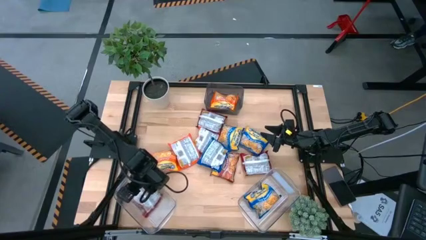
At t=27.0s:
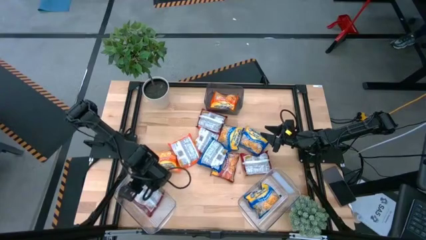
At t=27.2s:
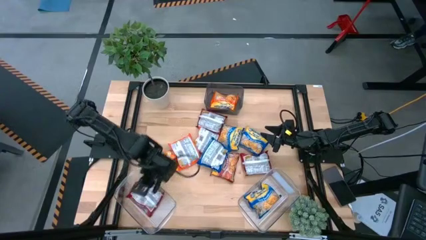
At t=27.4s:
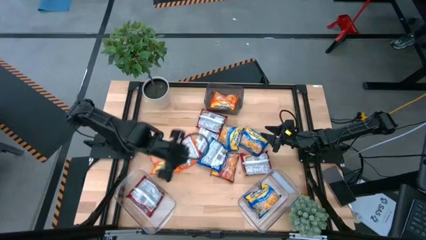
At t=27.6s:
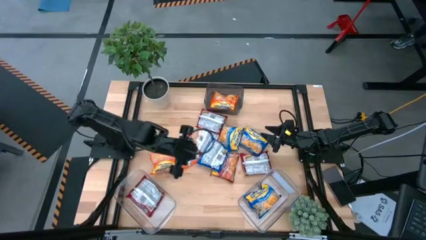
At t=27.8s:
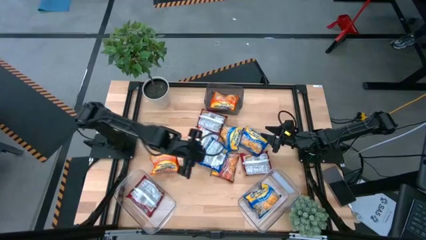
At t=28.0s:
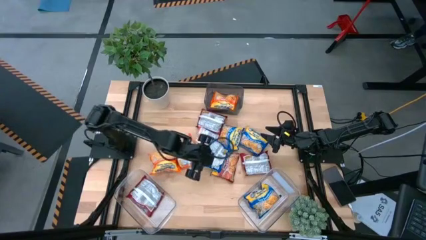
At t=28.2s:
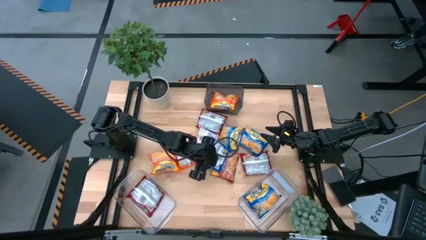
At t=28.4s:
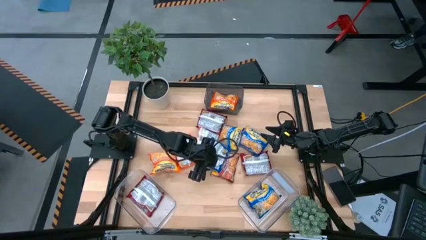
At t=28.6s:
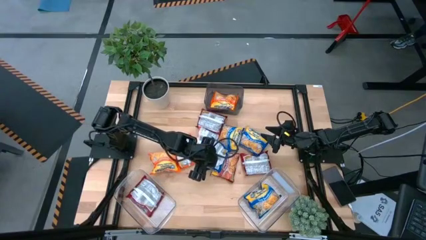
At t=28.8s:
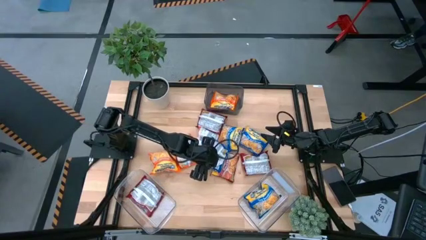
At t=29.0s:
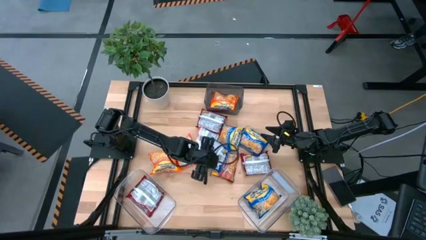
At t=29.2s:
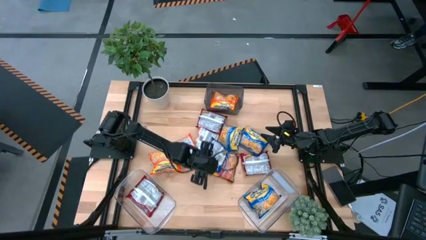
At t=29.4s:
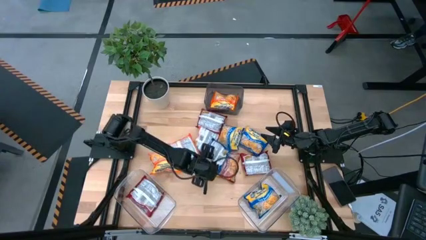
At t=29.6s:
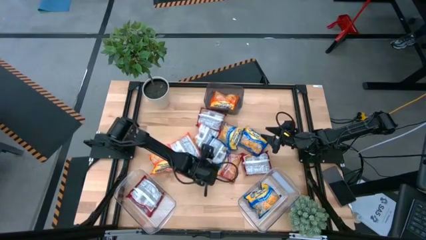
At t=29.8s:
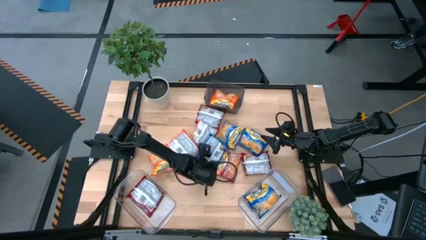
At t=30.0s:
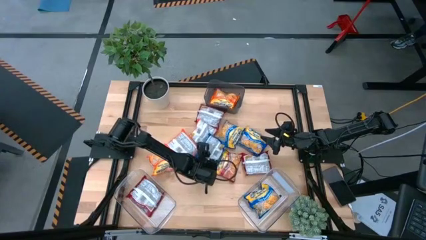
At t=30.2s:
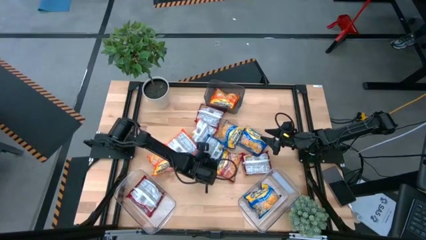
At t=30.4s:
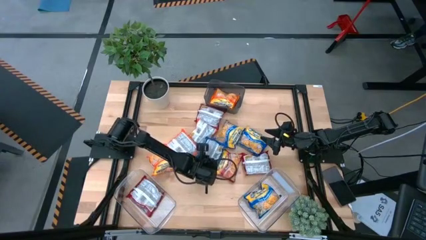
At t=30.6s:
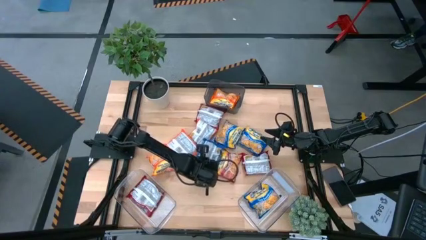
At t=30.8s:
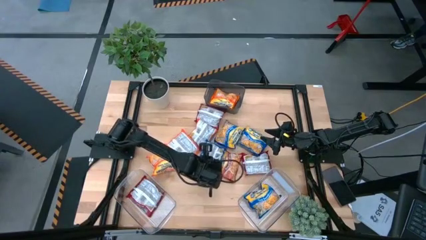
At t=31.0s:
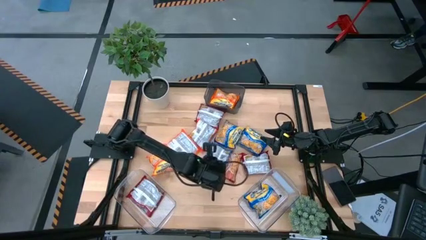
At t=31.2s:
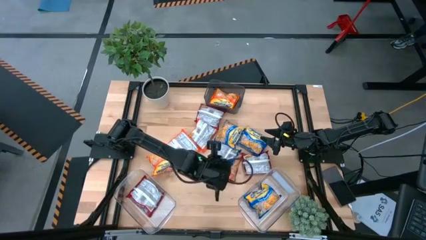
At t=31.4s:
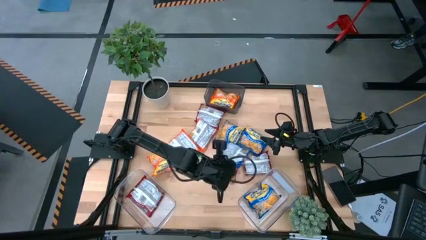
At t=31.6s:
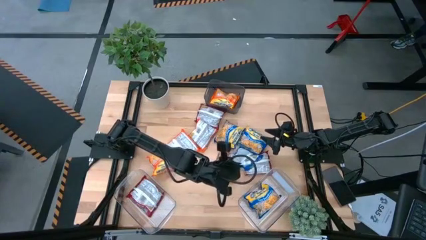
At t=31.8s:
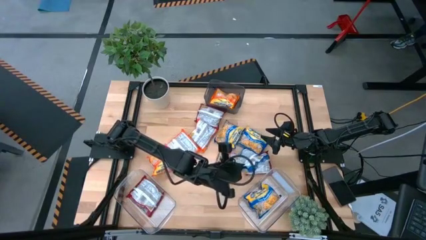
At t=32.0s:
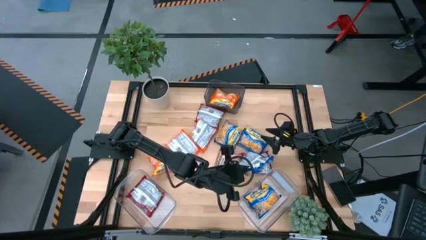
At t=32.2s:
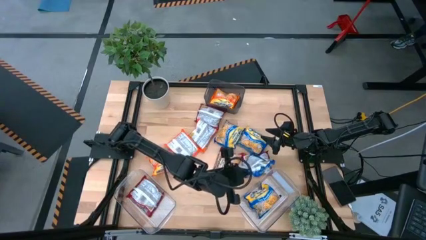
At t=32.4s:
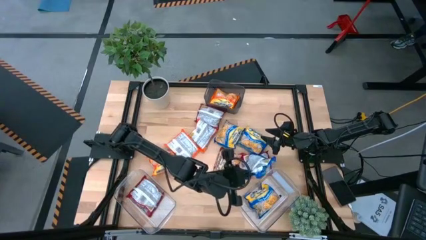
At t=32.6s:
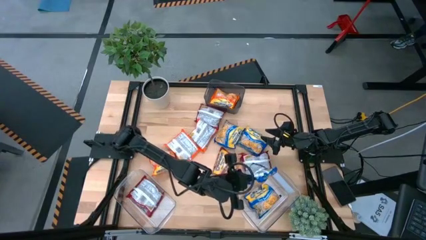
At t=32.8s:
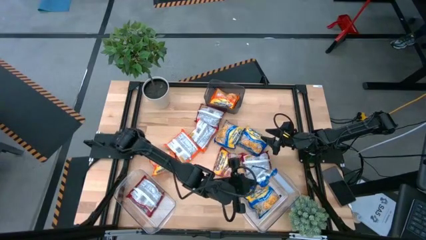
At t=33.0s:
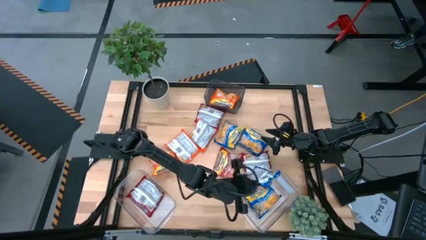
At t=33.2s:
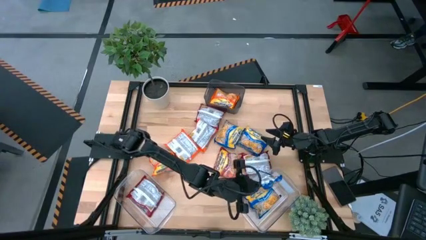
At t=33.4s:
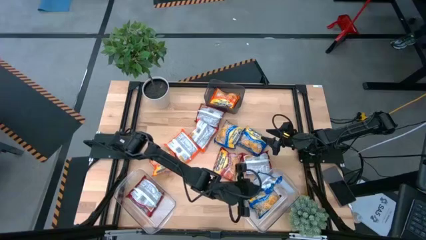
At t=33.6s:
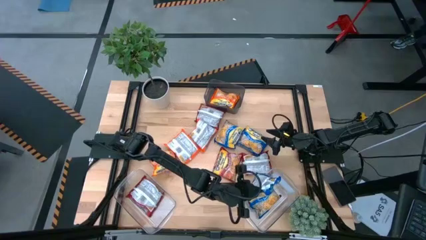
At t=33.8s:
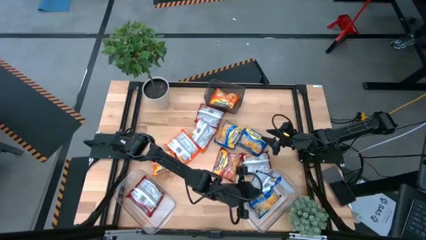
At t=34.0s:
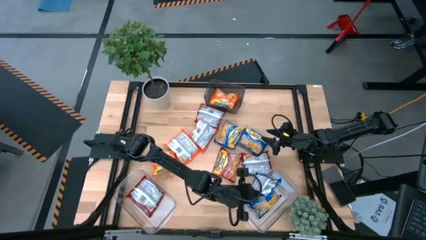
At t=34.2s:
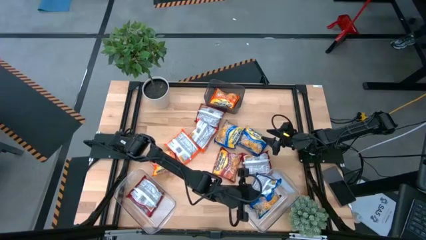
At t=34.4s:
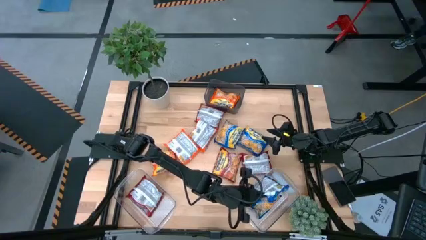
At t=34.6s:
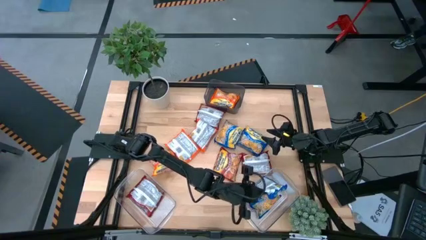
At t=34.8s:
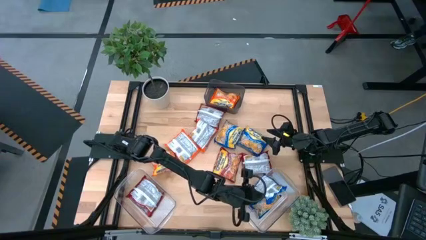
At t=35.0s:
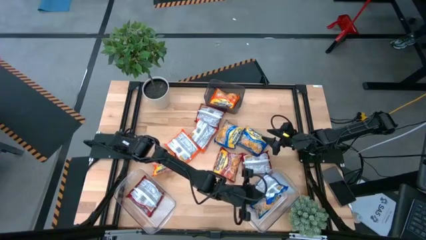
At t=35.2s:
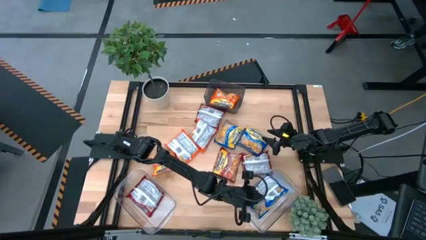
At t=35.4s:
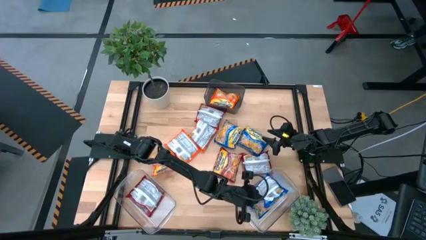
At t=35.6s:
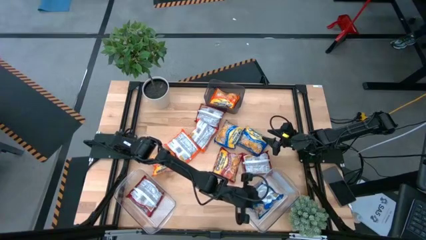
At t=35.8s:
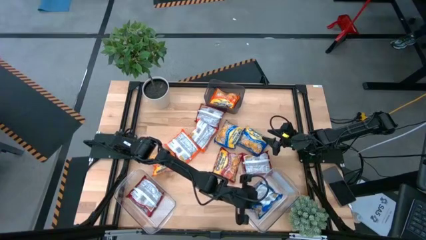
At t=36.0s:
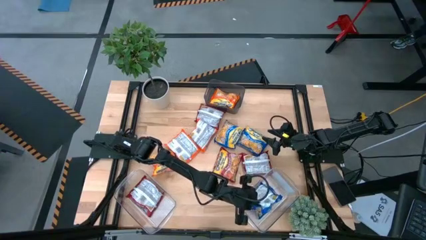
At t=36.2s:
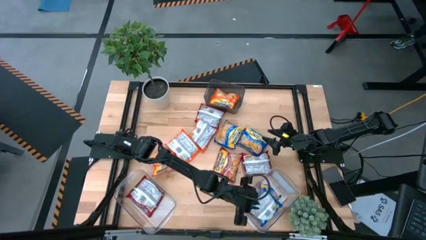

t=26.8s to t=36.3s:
Task: Sort Maruchan noodles
Put the blue noodle pack into the right transparent bin

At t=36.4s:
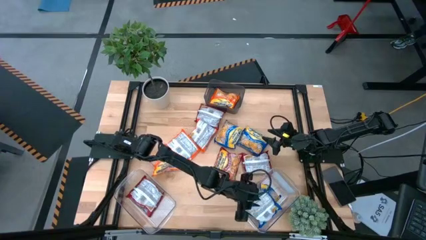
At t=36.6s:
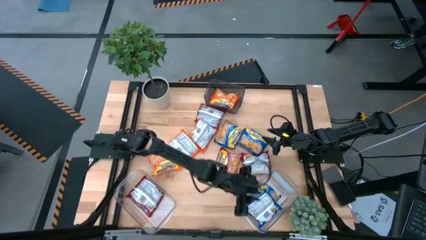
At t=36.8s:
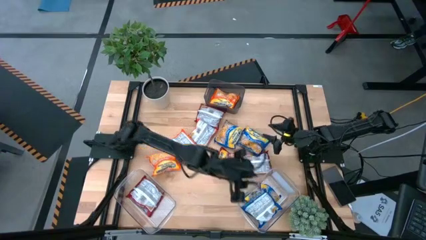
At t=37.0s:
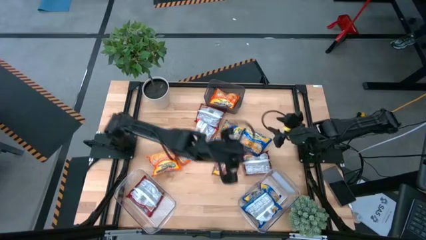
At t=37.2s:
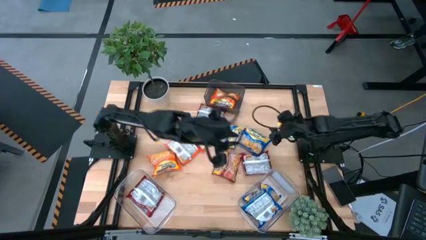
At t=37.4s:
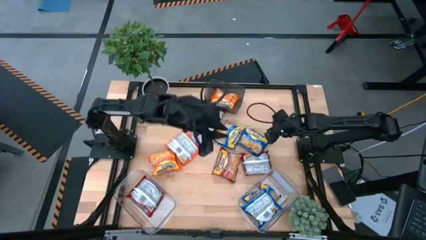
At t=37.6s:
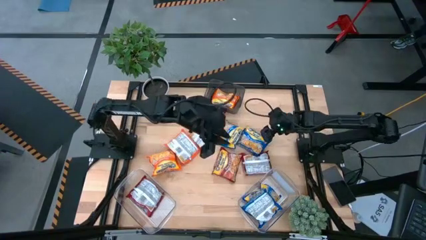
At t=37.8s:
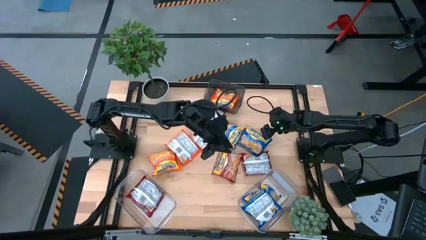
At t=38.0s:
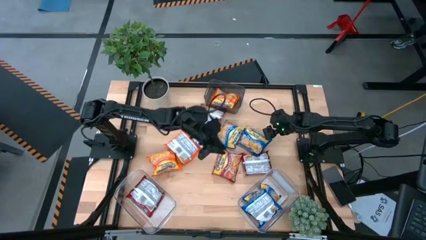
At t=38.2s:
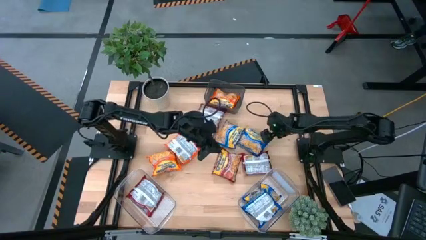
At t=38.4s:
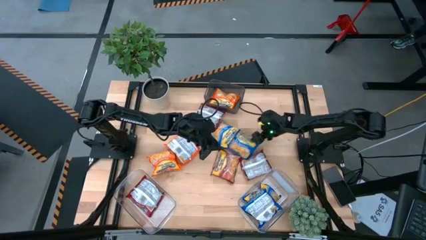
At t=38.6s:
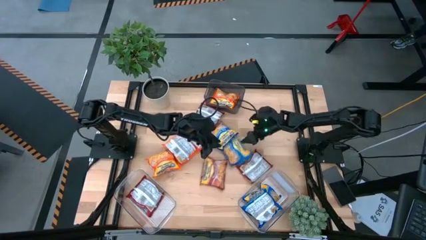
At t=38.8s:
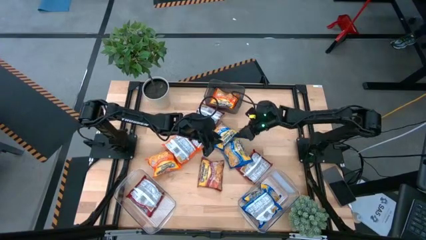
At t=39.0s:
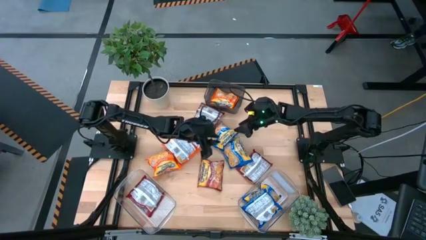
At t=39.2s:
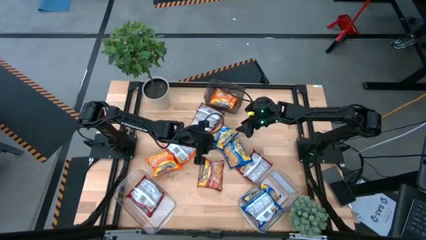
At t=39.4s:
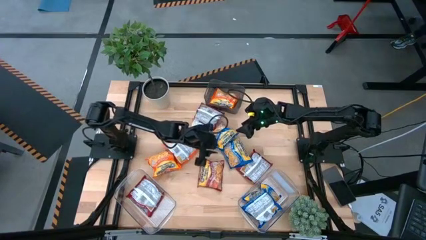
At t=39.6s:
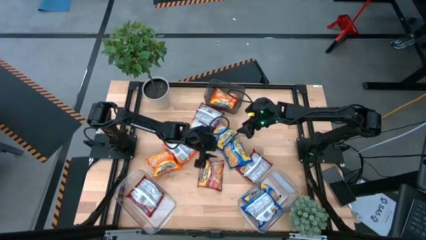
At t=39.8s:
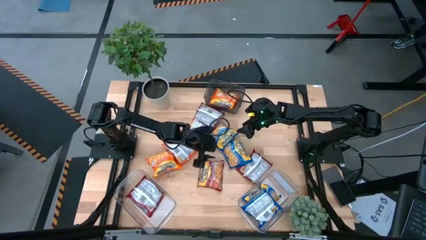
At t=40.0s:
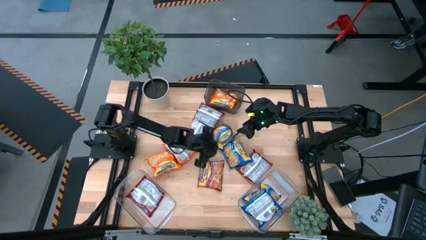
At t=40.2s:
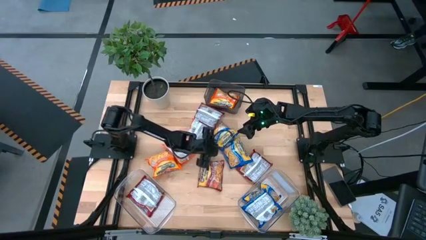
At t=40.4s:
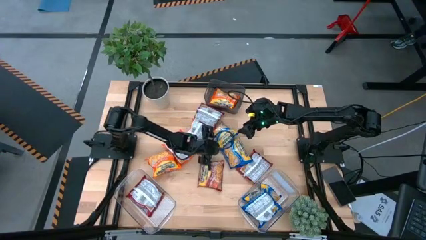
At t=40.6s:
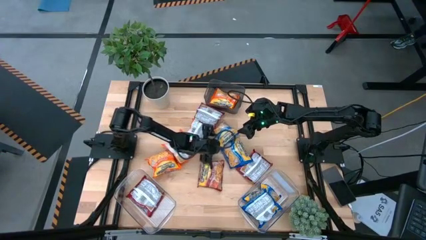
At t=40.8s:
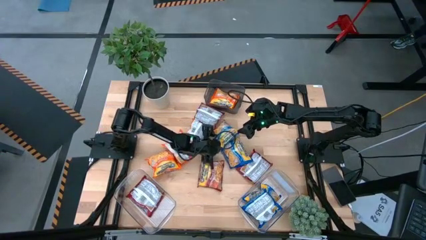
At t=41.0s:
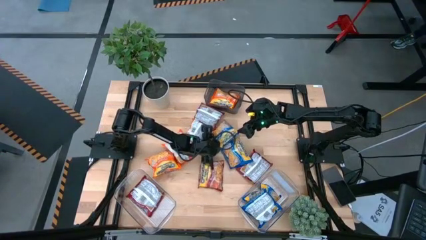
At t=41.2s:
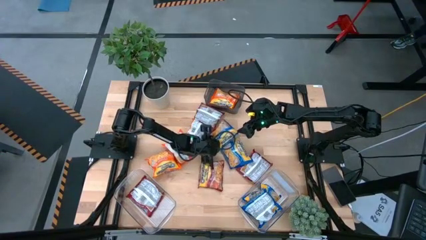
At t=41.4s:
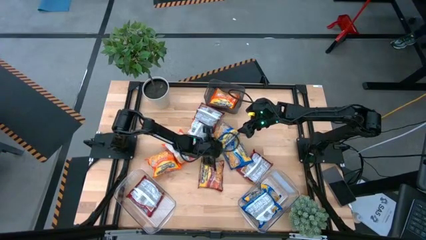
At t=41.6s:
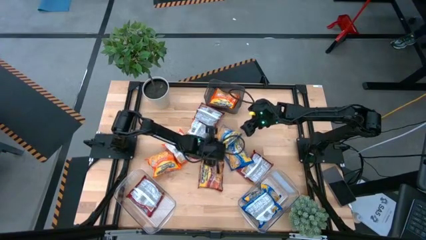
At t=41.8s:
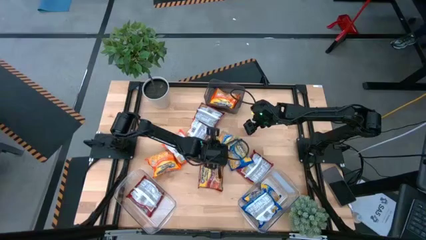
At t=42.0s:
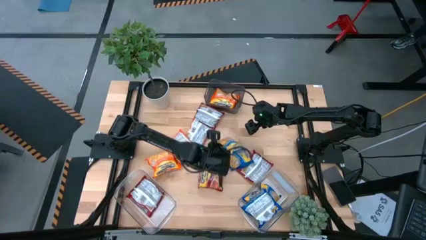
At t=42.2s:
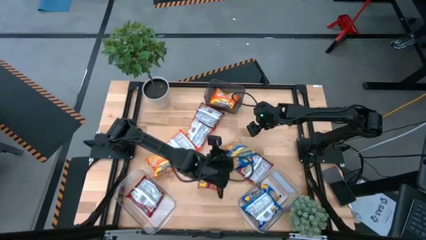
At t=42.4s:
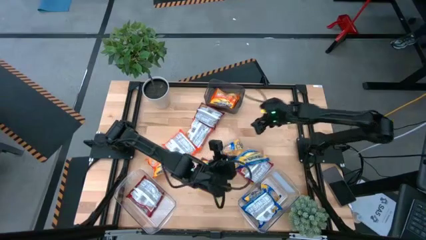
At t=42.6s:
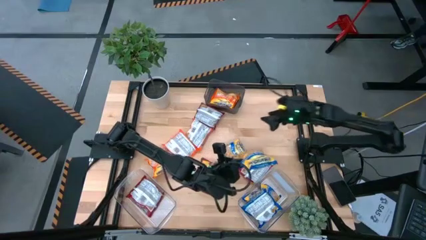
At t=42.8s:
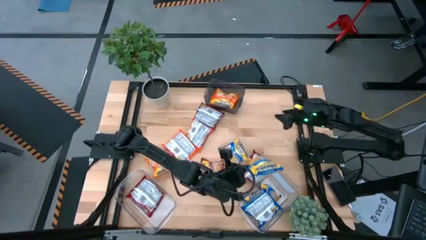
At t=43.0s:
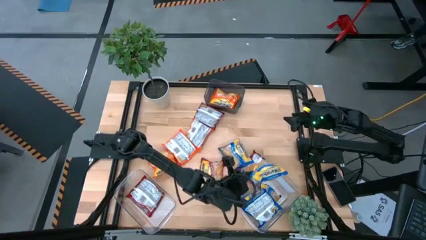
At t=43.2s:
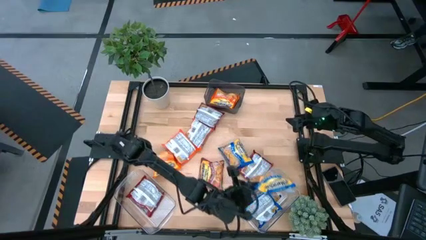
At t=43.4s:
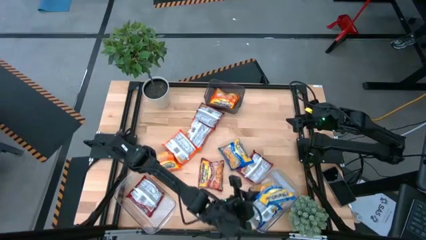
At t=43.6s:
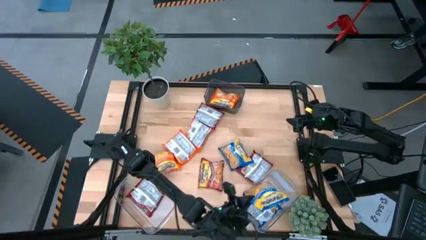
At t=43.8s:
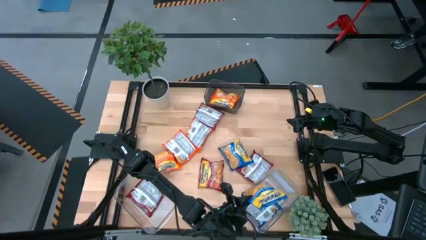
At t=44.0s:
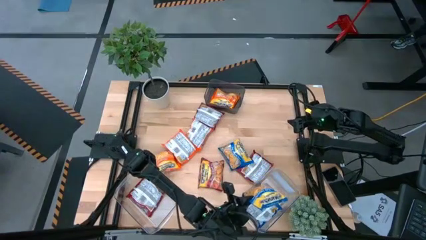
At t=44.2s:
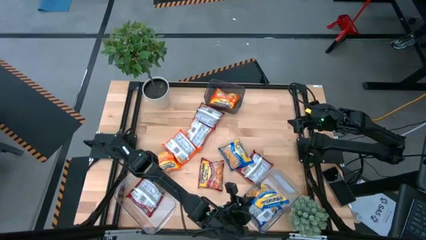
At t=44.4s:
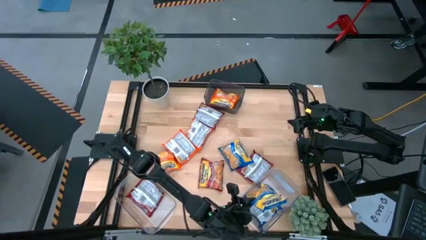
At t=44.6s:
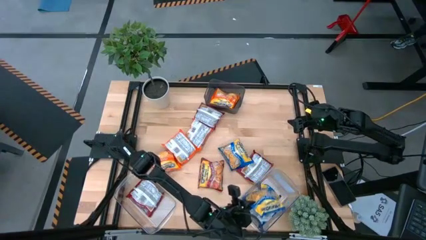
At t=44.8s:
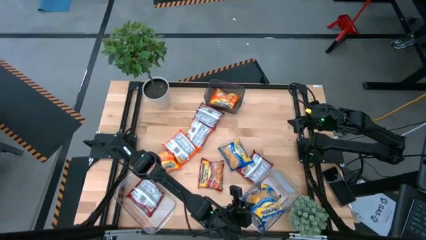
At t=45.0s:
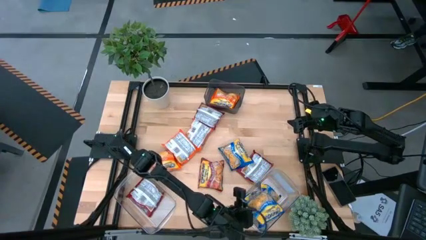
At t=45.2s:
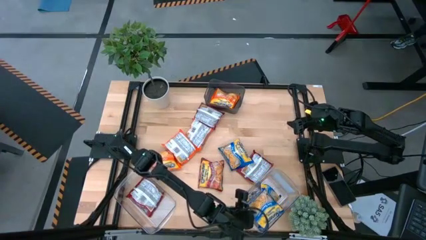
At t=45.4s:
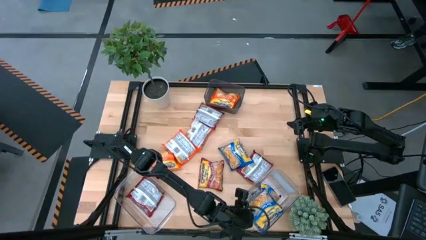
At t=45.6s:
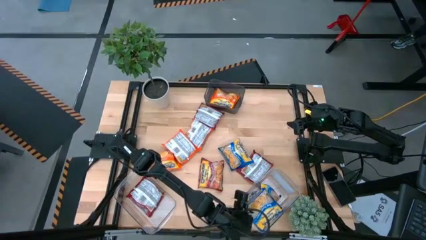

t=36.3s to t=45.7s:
Put the blue noodle pack into the right transparent bin
